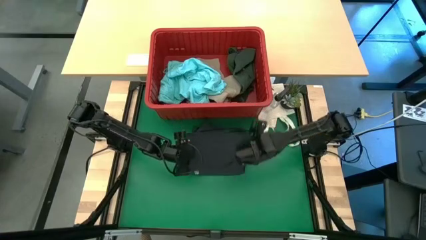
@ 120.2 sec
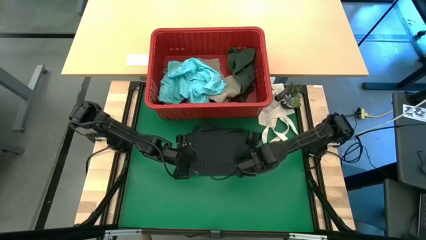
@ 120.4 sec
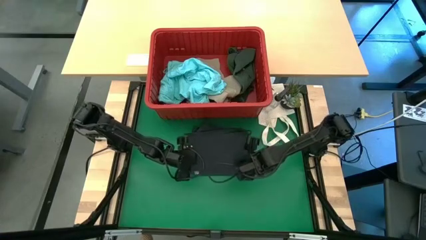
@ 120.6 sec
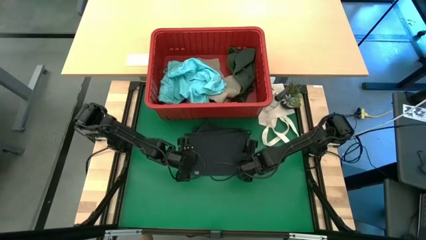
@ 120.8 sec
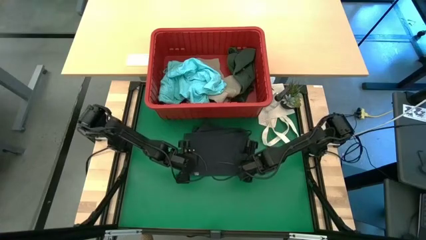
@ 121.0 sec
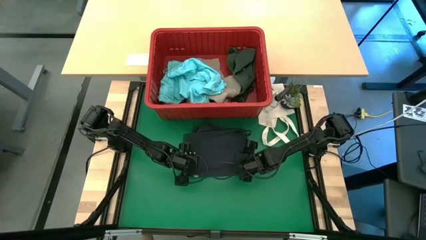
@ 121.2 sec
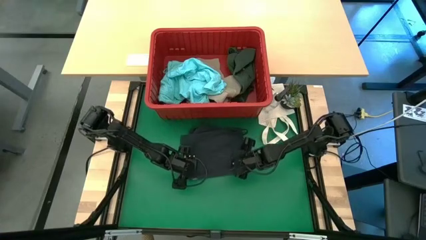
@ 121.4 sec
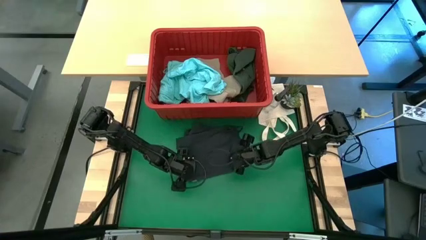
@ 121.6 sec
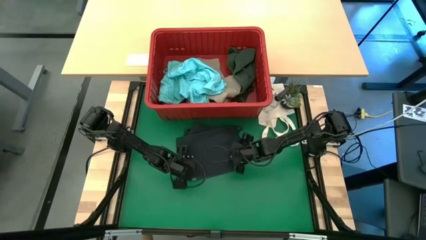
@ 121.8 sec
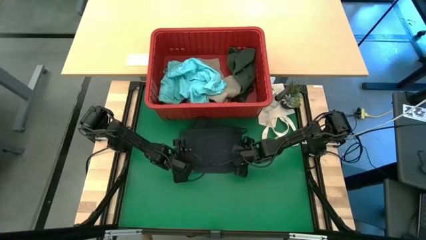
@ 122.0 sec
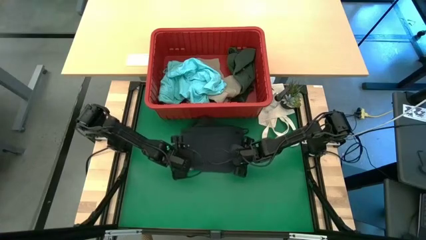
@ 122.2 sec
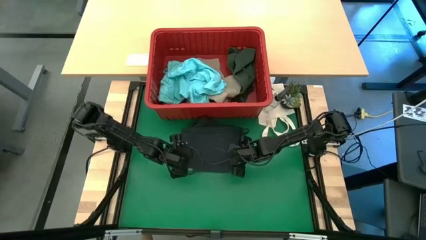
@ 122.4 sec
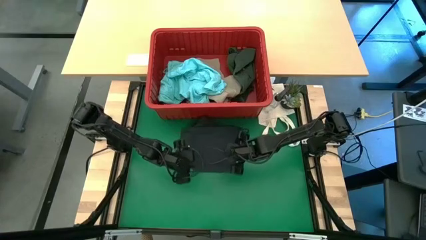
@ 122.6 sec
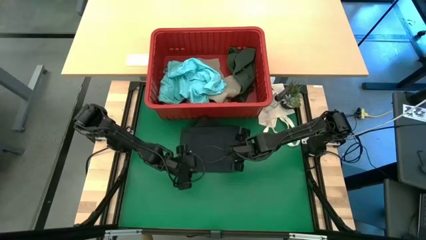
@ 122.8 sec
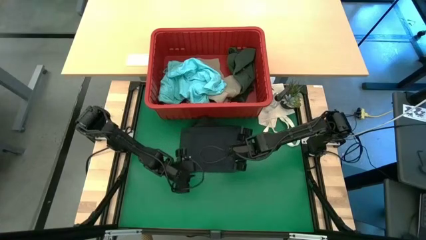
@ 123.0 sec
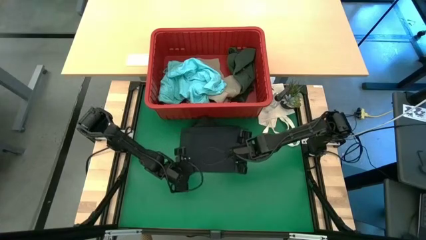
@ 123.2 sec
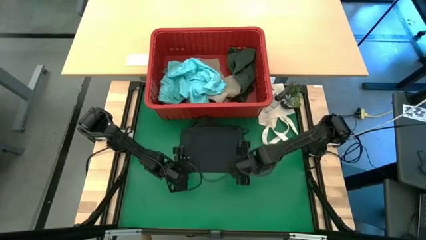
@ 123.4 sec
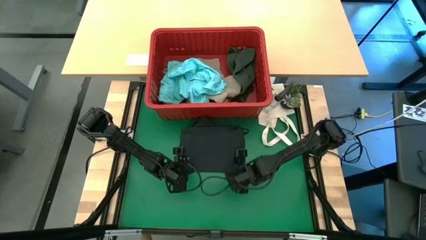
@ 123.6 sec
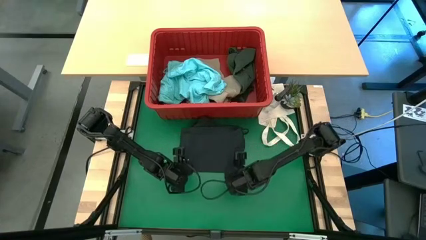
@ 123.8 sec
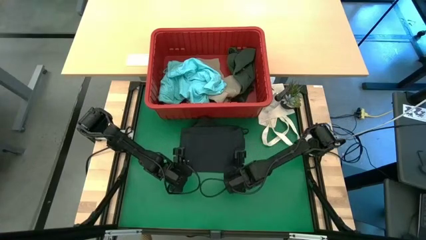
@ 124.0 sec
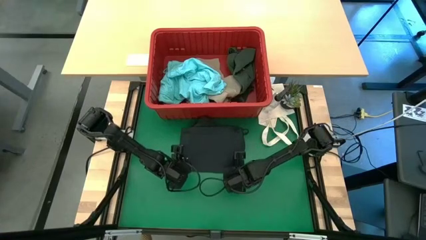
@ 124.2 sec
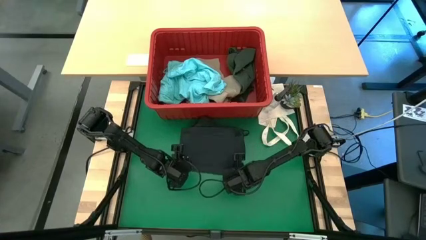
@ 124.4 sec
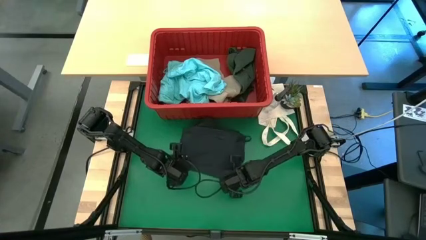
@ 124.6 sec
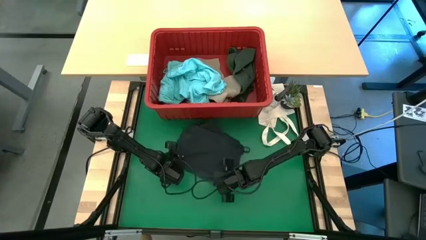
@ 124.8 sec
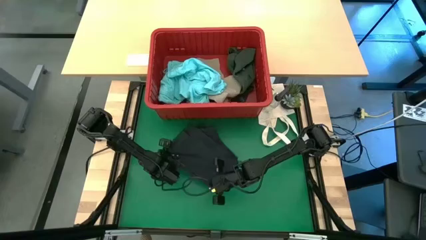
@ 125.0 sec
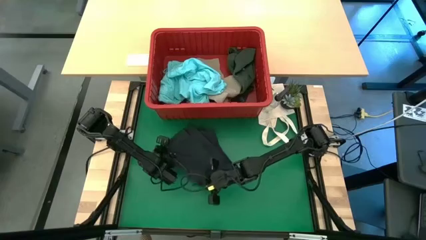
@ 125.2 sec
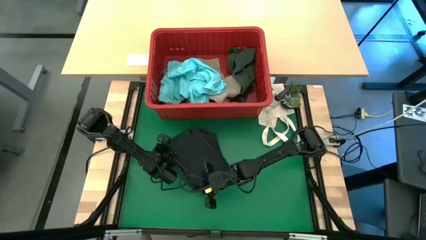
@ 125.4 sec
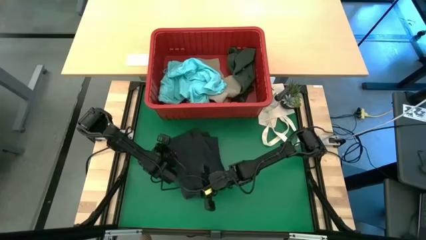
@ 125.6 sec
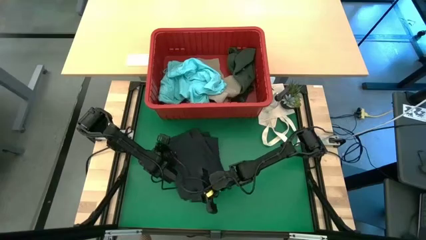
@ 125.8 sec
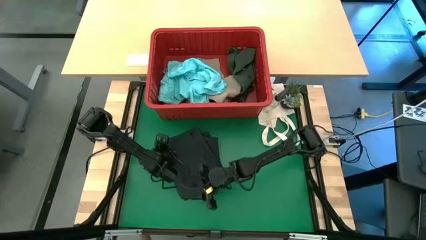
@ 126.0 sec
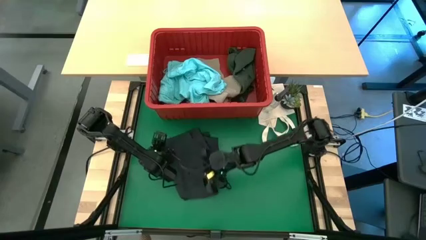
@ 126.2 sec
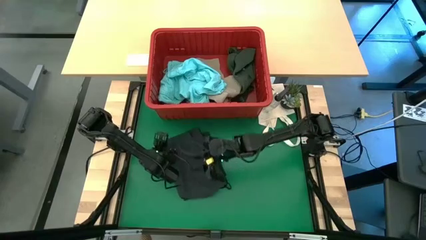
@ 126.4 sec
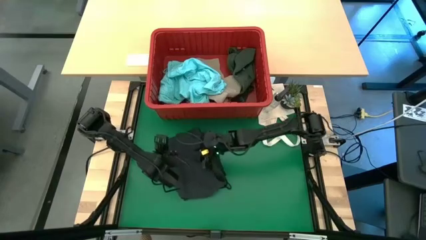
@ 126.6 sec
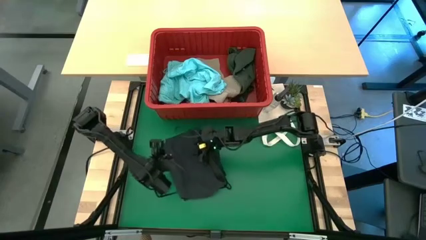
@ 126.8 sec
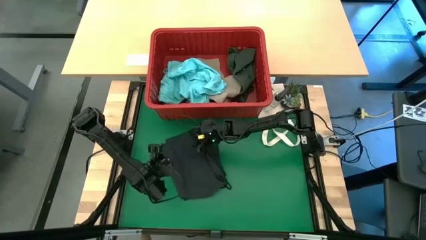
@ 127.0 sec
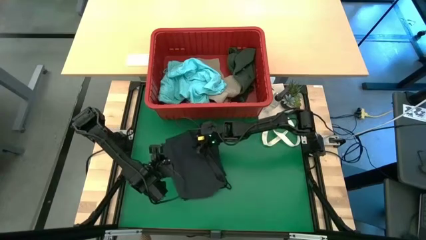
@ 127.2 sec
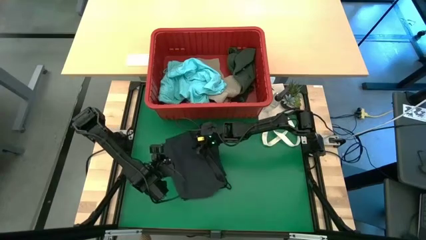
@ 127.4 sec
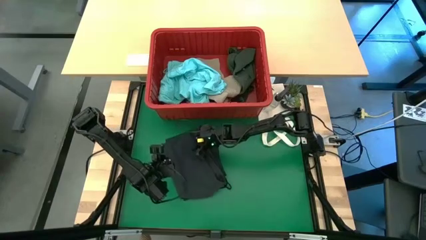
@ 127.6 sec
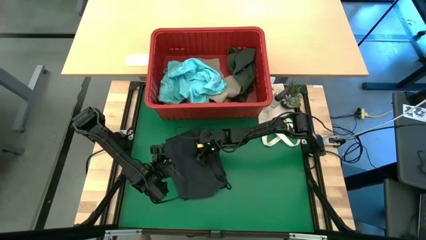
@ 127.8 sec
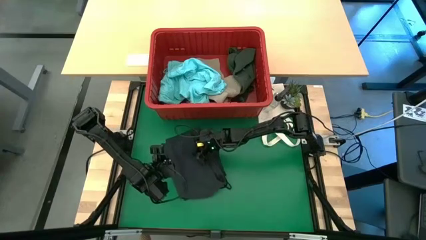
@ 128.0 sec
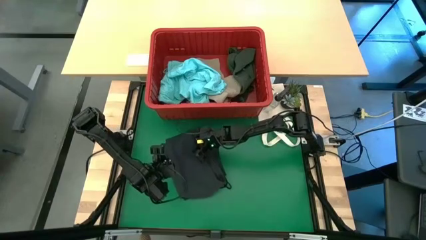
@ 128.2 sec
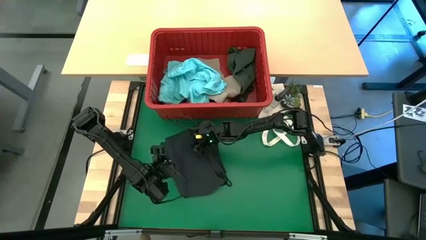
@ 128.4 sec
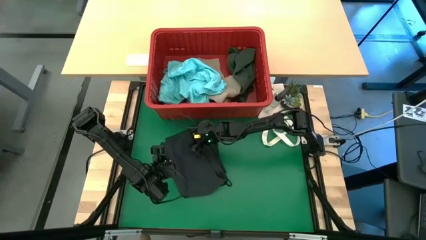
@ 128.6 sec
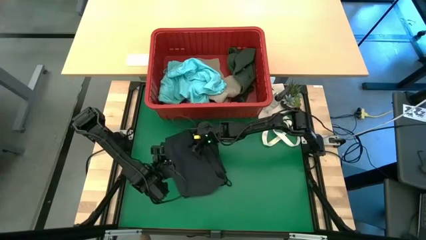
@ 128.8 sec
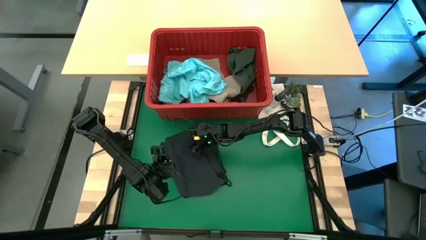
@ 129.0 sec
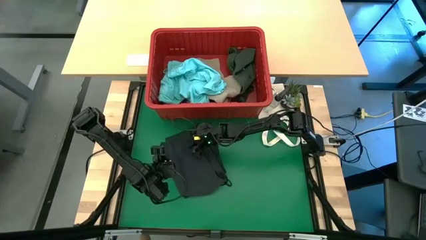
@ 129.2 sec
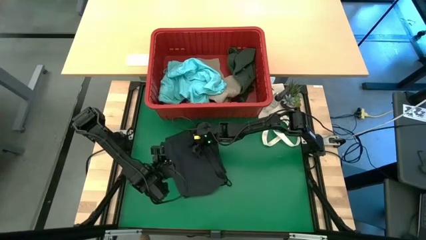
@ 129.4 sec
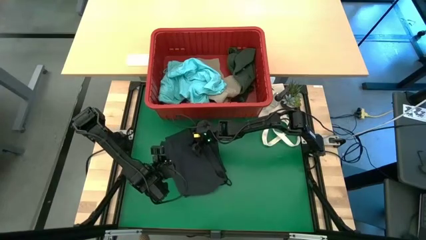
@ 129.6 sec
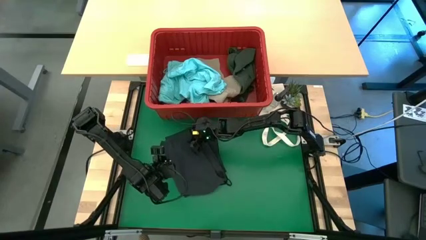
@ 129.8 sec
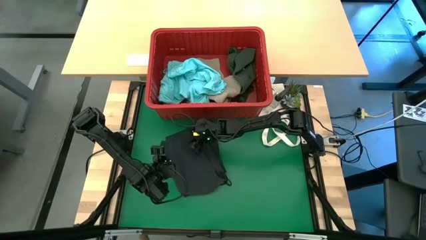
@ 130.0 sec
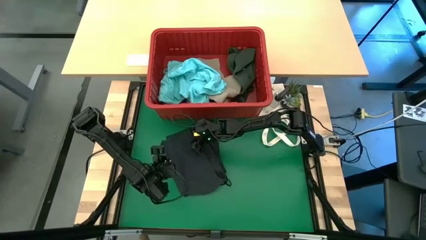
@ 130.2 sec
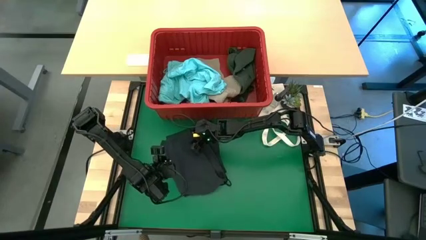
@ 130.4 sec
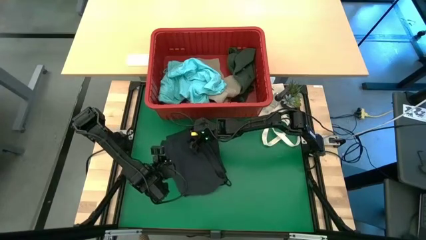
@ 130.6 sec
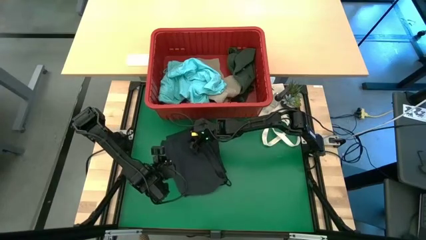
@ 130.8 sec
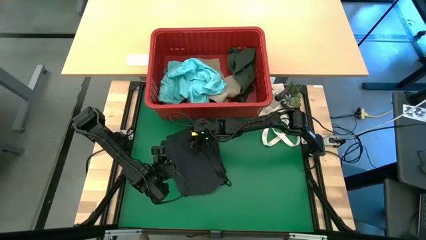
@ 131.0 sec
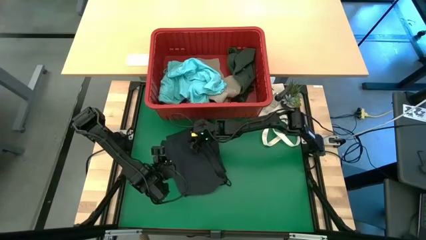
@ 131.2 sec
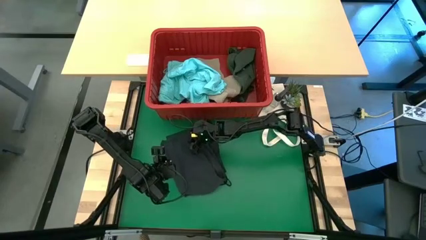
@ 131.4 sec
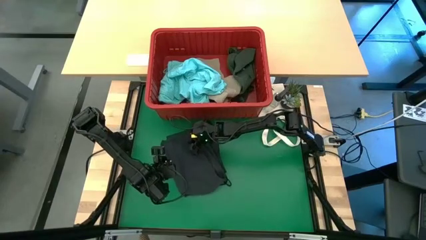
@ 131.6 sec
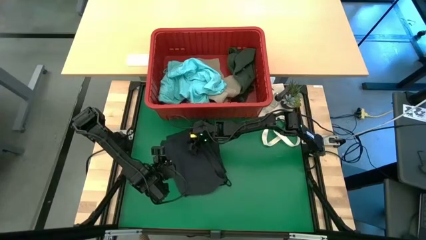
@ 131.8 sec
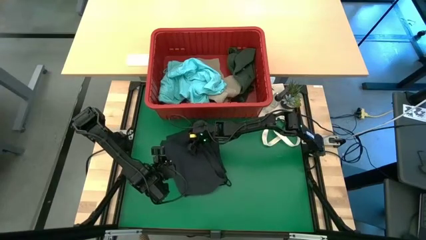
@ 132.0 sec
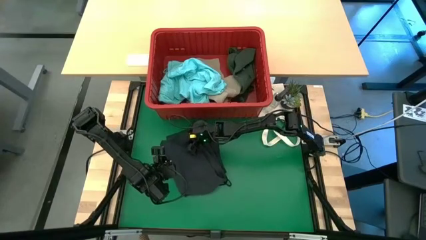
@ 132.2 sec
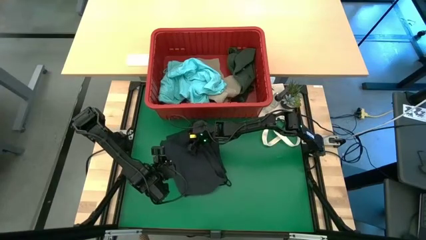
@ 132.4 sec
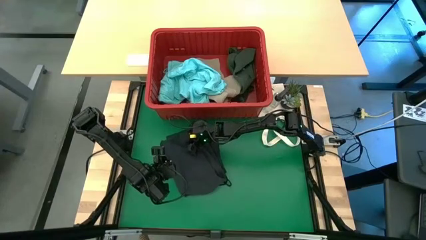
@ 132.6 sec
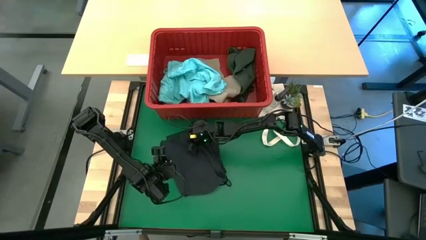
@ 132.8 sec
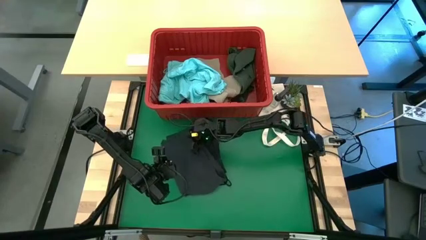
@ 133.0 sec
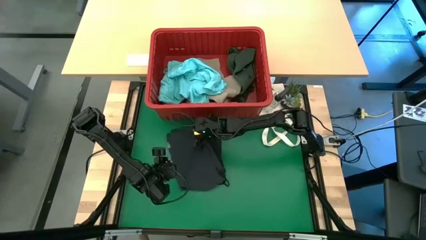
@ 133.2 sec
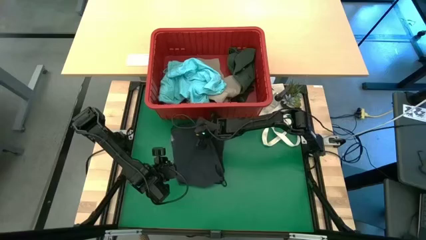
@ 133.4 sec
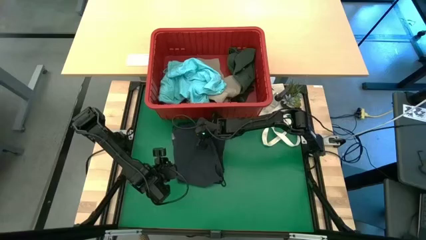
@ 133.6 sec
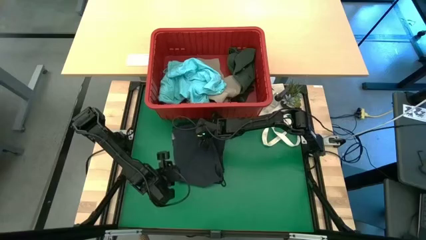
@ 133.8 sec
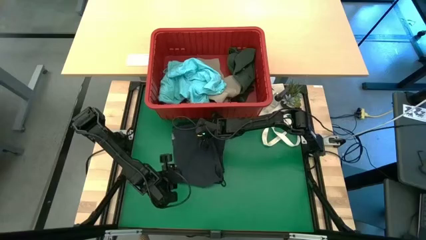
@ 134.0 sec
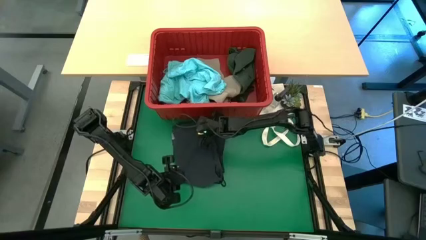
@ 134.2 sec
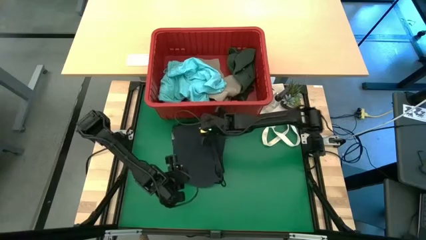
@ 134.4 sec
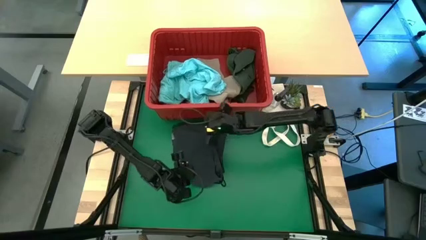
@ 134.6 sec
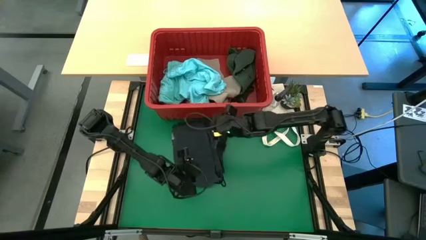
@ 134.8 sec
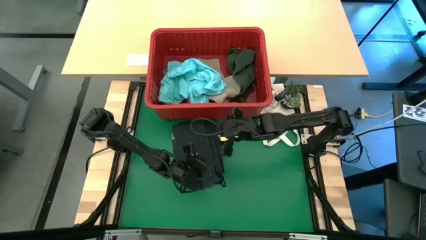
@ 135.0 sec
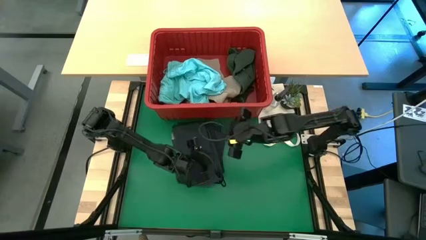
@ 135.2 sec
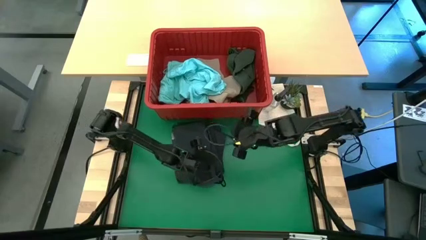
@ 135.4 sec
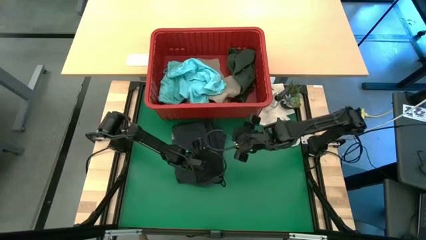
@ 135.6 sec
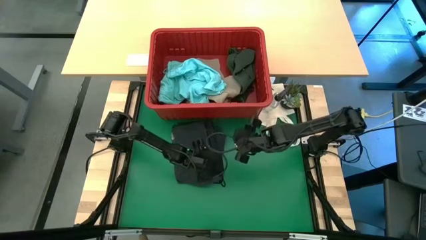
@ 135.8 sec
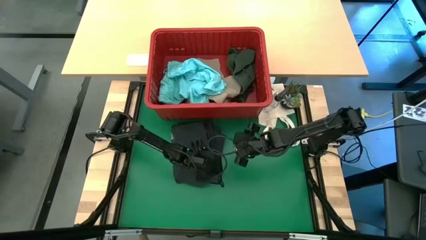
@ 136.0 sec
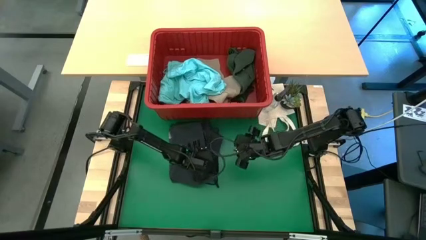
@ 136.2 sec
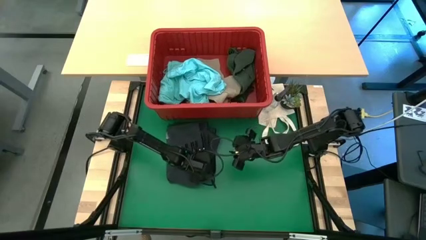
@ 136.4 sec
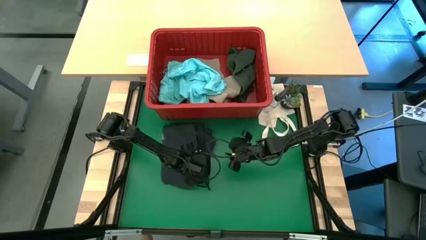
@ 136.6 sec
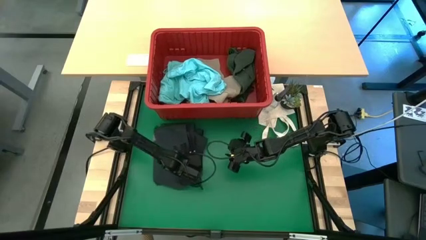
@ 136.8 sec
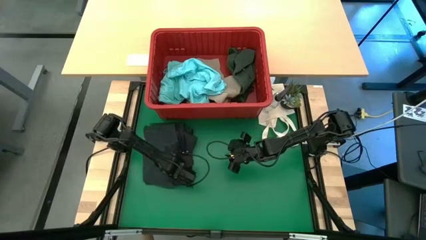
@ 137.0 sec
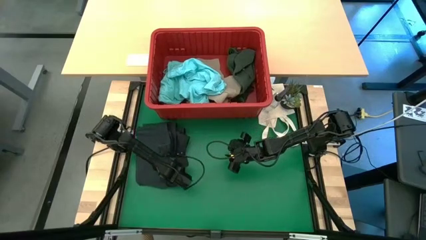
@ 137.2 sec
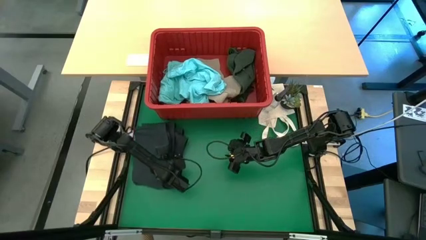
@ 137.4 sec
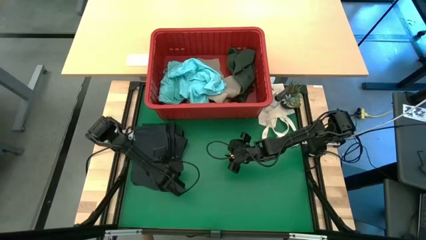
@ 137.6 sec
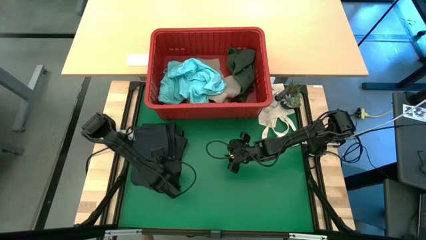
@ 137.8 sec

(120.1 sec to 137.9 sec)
Task: Fold Laundry from Bin
Fold the black shorts from the red laundry bin
